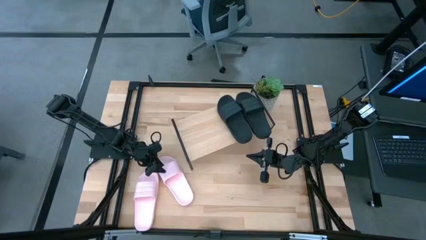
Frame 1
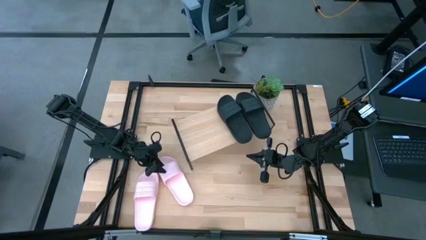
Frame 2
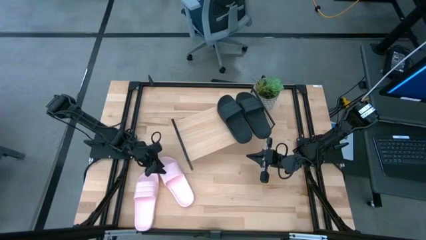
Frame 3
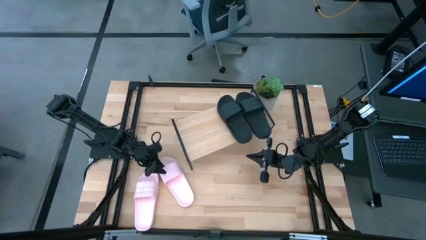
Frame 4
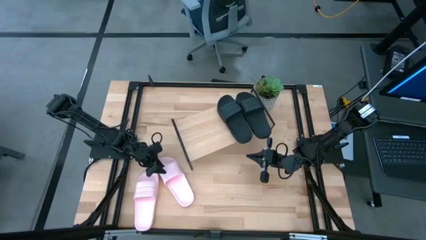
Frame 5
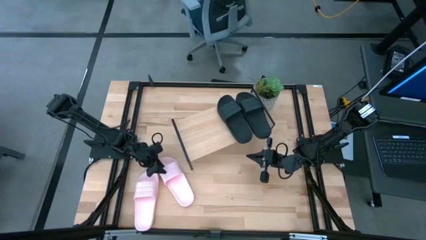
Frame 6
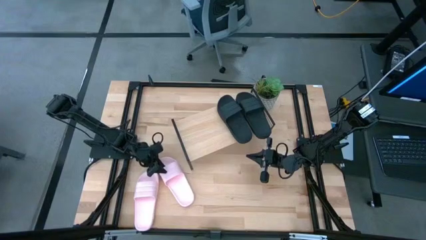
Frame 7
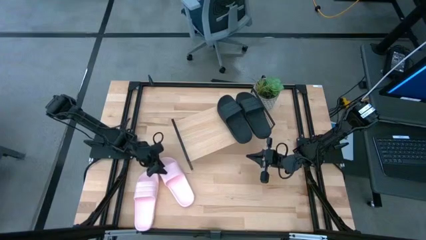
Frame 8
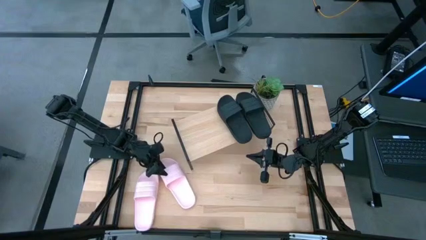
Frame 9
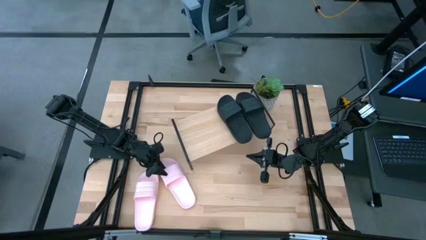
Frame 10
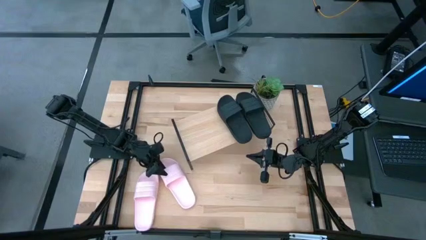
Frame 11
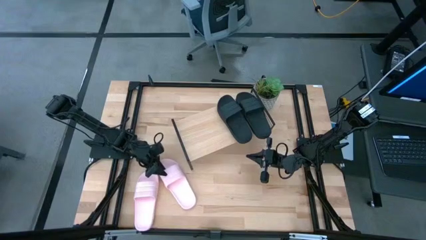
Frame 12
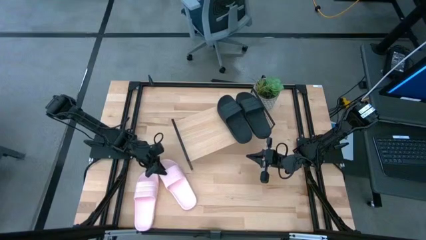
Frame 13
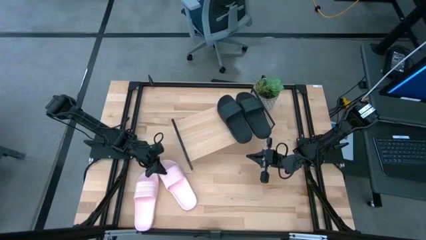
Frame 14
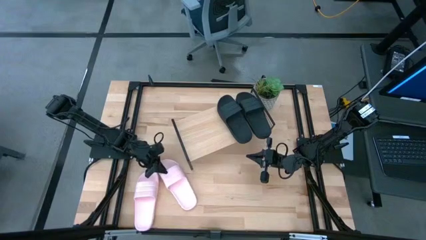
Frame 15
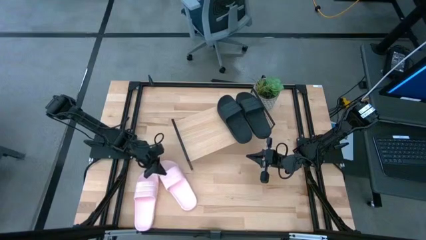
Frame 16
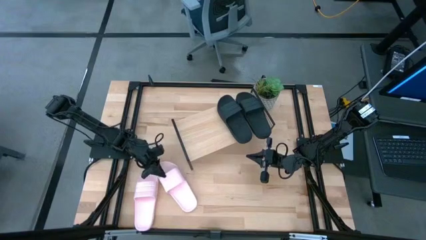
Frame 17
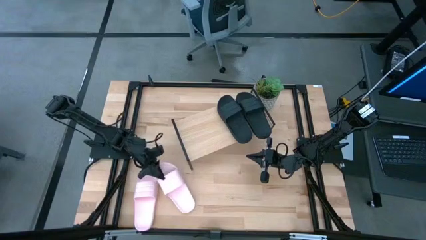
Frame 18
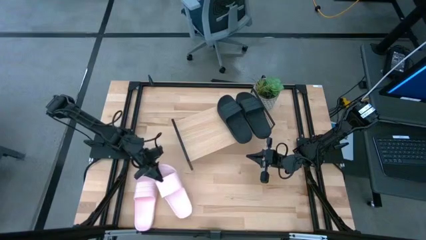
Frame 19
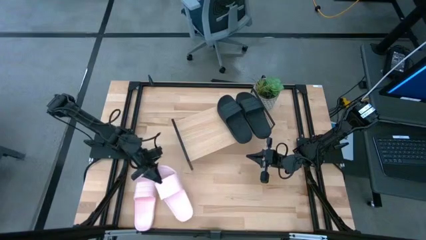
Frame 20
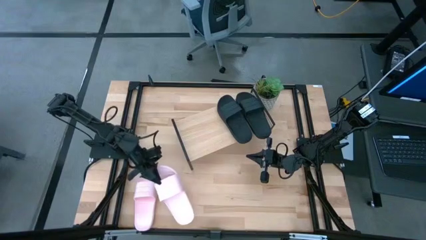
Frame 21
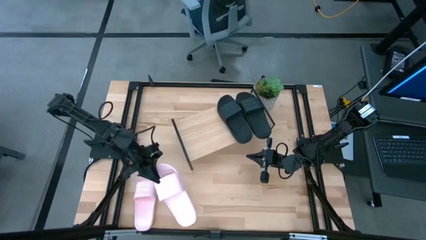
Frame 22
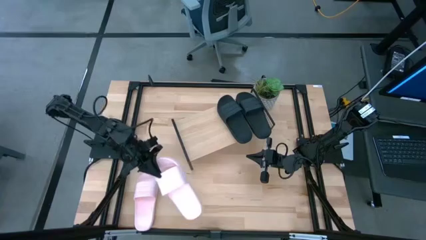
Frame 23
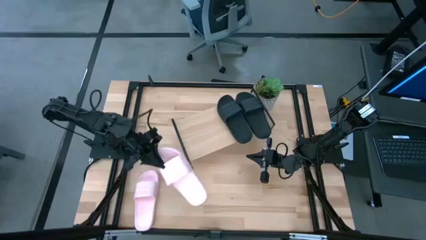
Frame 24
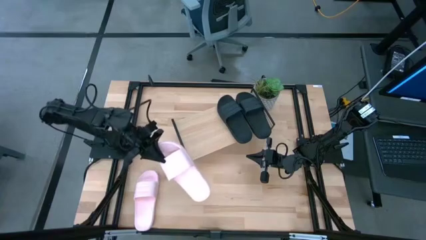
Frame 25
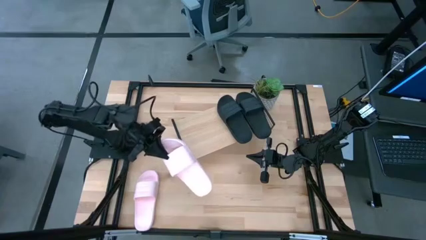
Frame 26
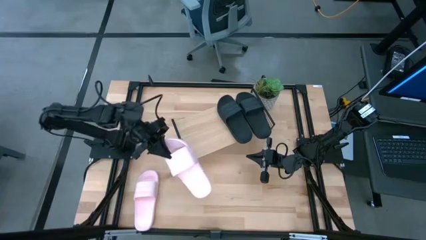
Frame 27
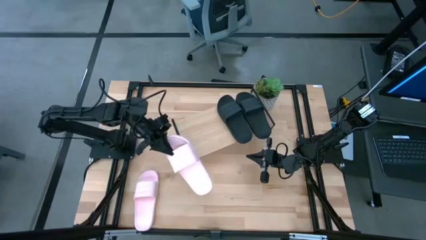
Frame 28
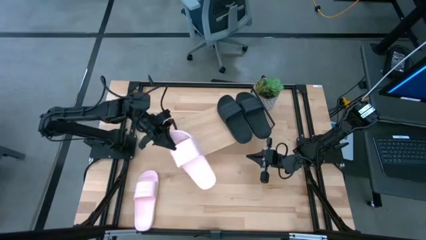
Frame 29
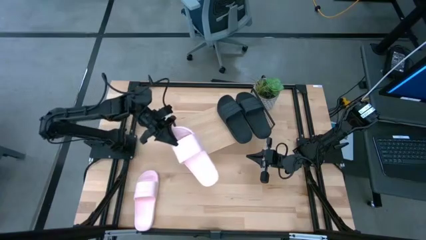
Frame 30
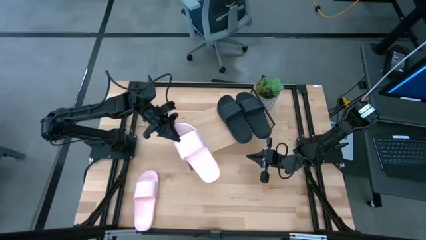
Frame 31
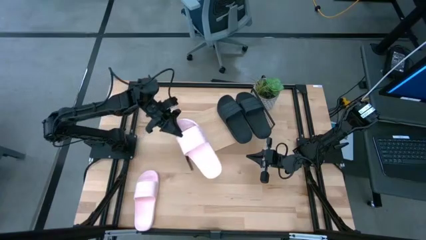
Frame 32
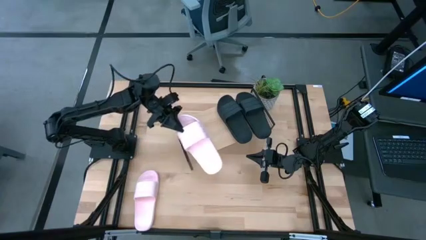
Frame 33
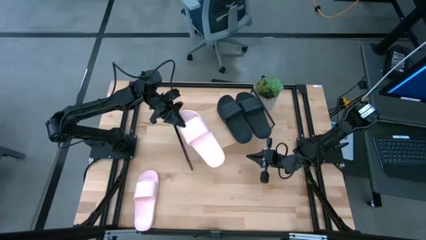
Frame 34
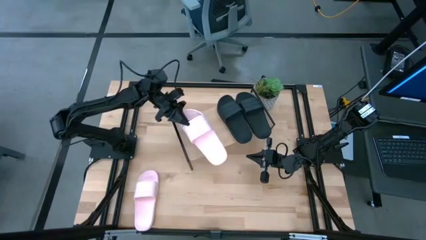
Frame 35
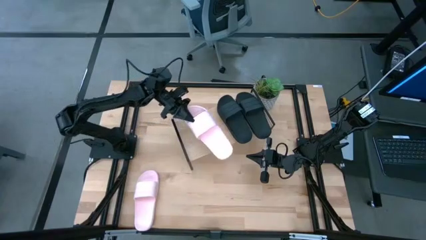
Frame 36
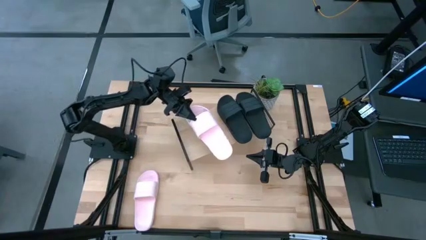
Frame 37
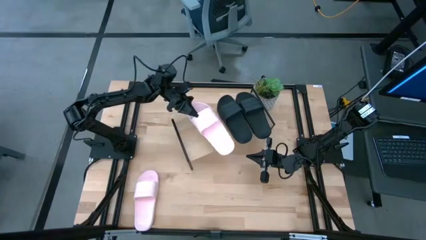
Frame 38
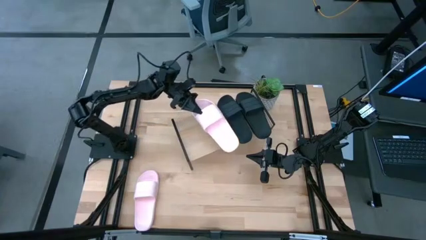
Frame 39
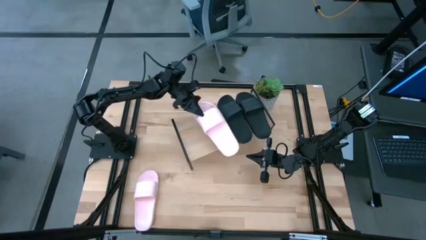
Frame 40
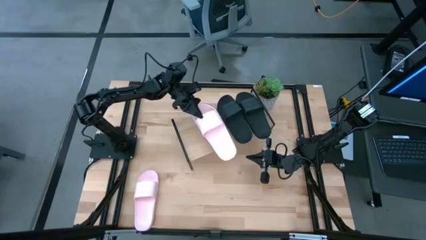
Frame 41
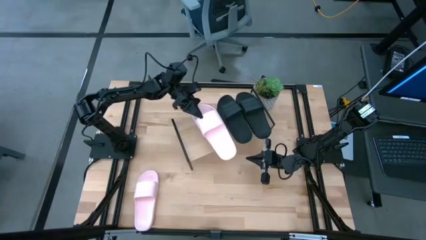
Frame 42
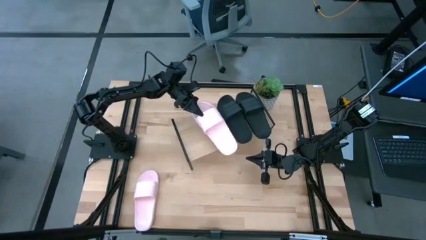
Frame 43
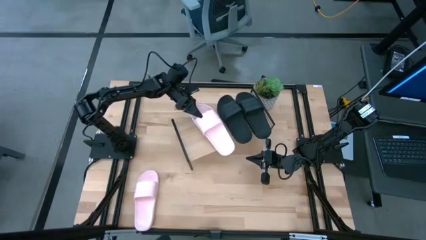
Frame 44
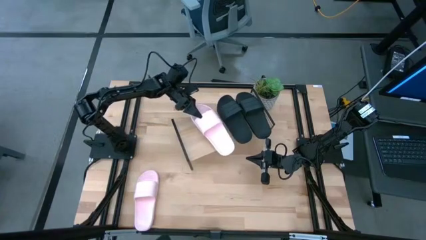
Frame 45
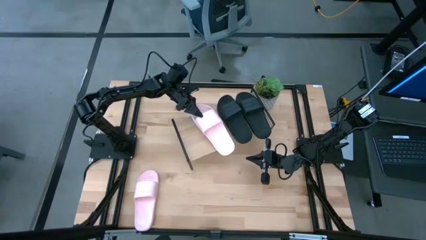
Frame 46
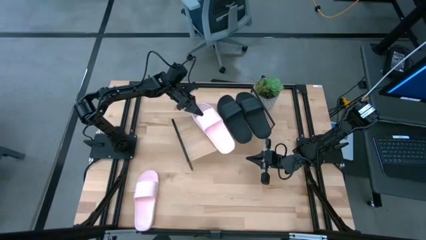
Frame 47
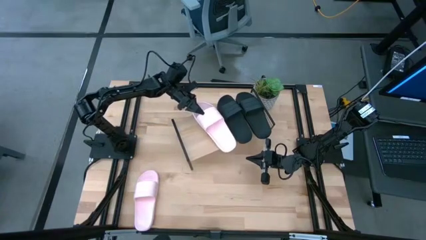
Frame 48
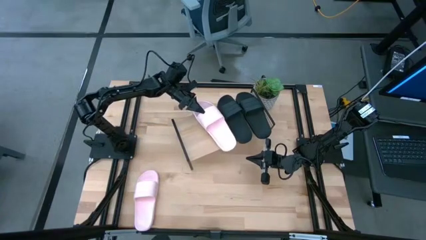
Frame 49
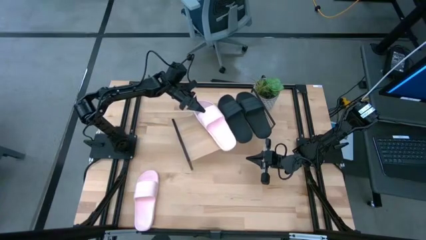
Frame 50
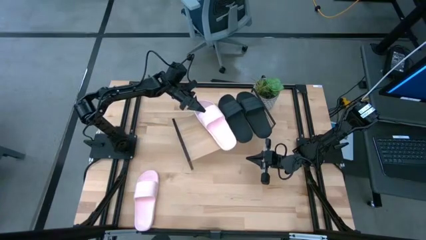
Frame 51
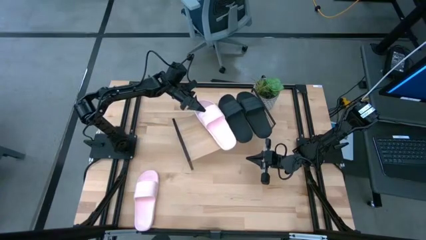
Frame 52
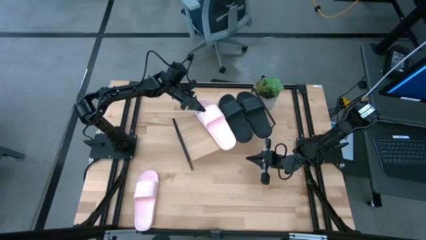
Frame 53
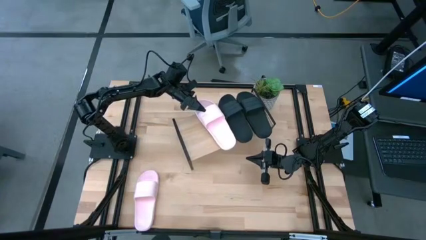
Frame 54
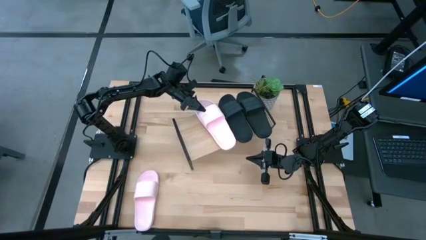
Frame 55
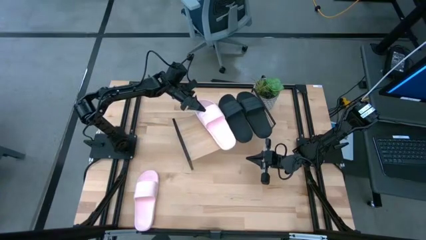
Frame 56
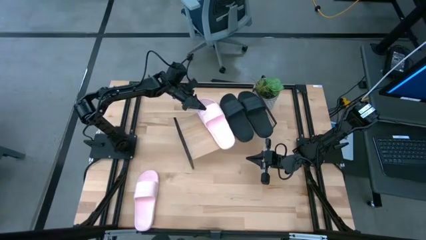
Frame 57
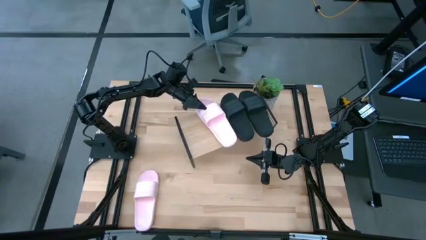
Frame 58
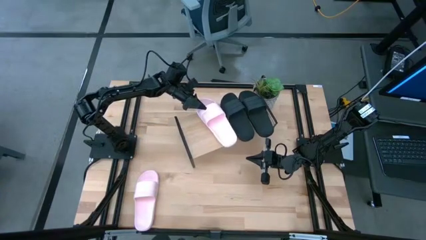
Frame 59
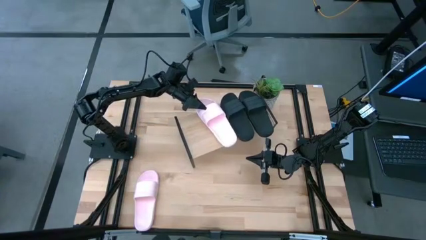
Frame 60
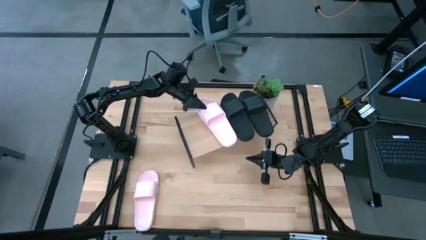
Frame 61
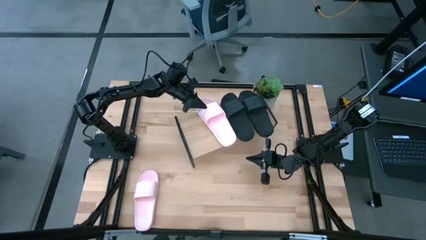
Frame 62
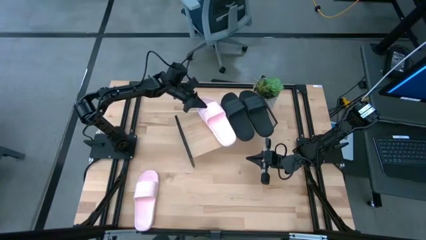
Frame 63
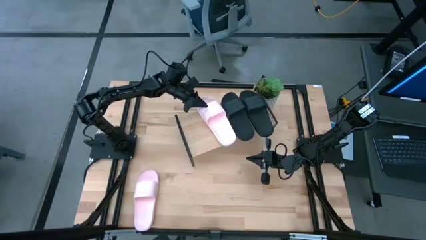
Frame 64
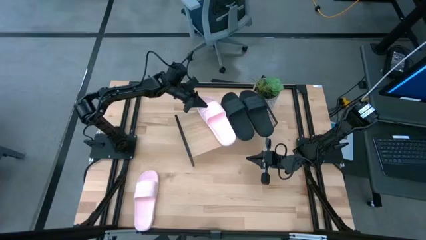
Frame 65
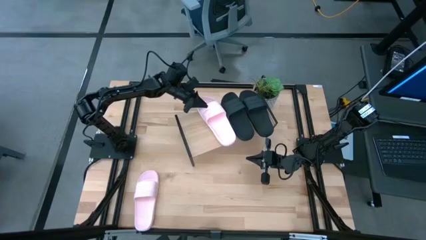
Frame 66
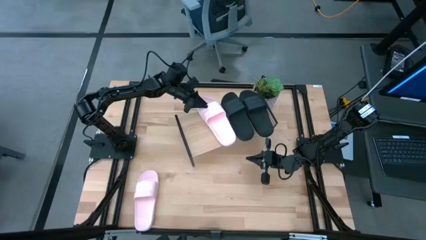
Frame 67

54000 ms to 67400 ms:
Task: Pick and place slides into the shelf
Put the right pink slide on the shelf

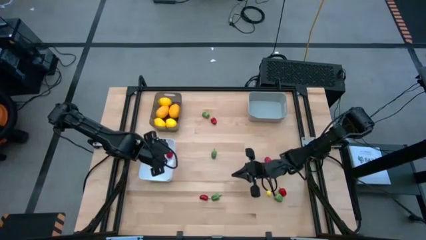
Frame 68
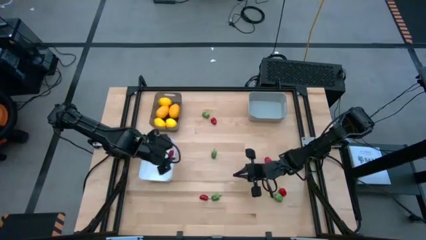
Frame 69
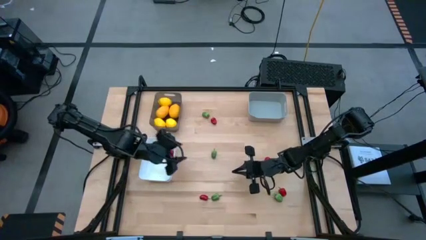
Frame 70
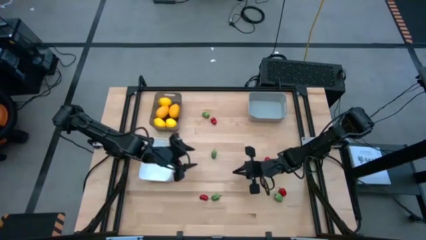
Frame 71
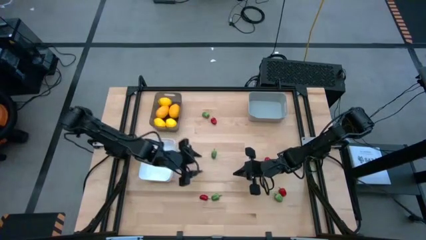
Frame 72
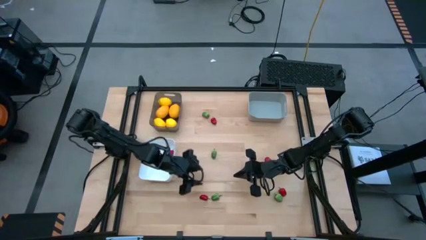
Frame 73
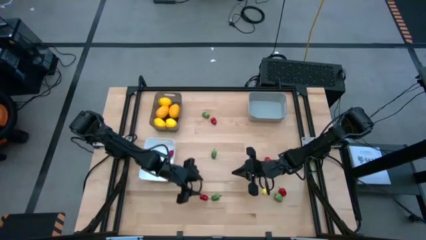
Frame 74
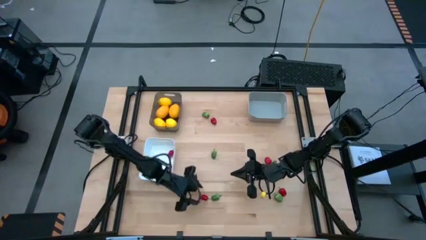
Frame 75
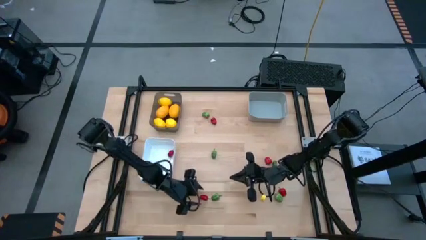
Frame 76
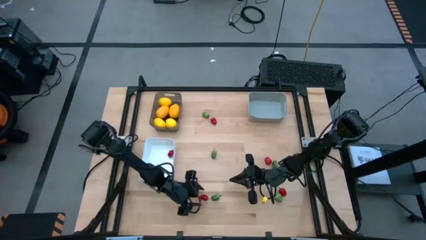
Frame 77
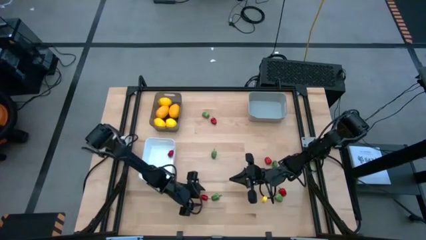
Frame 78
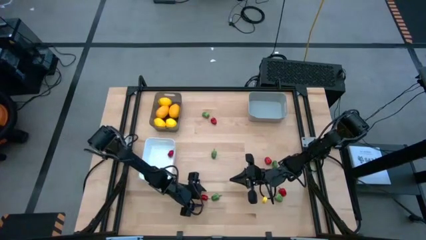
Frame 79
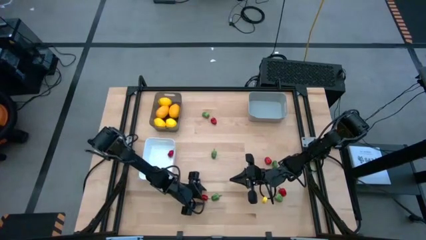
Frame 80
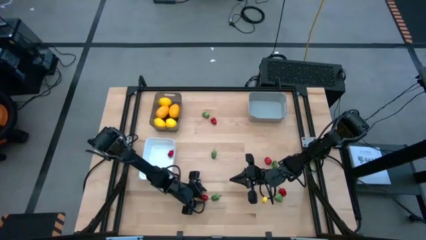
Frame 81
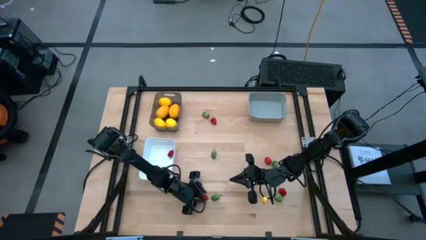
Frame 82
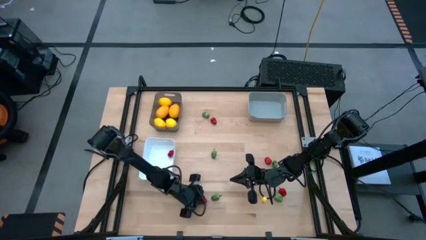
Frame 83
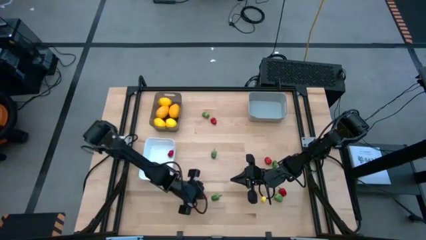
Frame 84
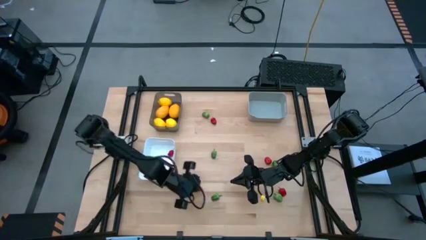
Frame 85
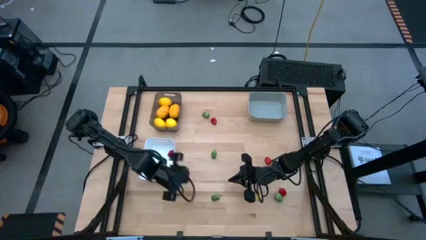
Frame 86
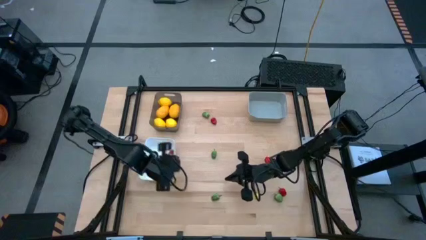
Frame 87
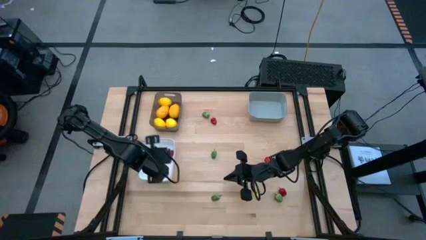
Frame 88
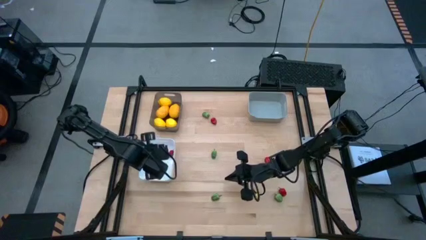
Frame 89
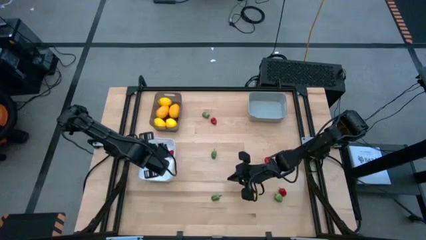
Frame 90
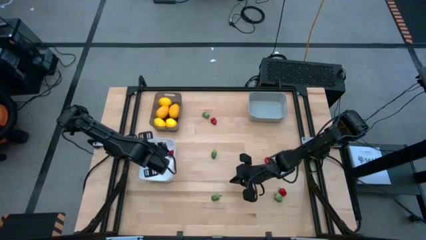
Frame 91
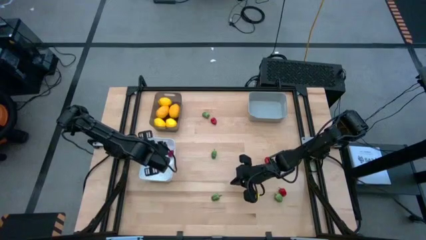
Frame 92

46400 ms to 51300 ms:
Task: Sort produce into baskets
Put the bottom left red chili pepper into the white bin
